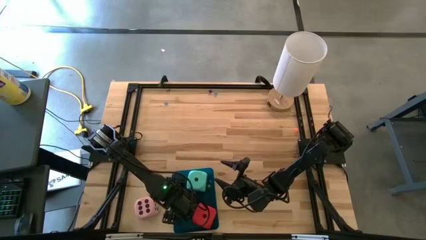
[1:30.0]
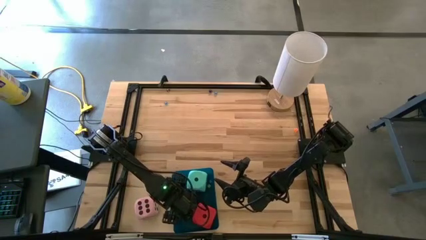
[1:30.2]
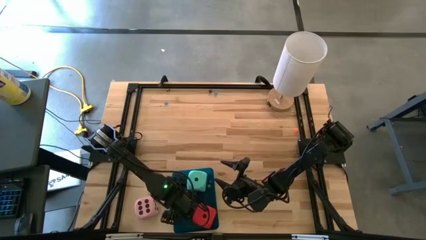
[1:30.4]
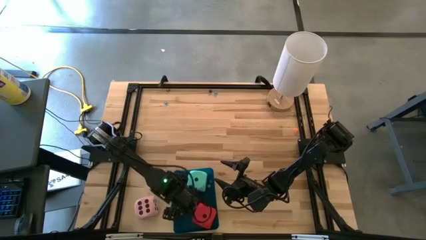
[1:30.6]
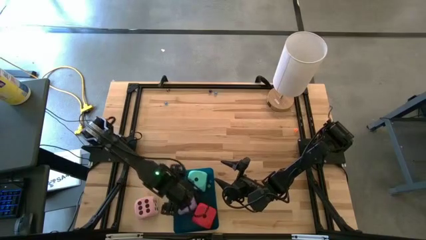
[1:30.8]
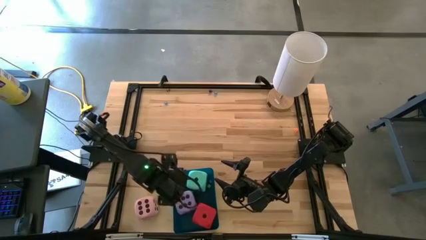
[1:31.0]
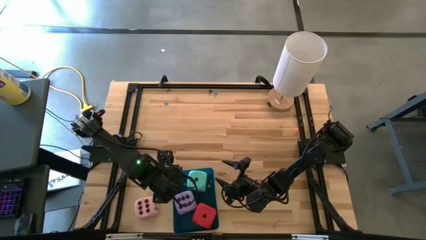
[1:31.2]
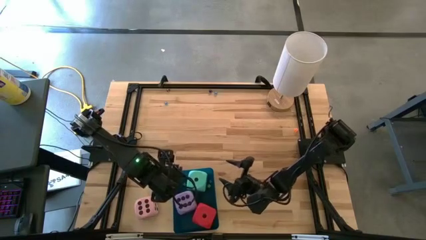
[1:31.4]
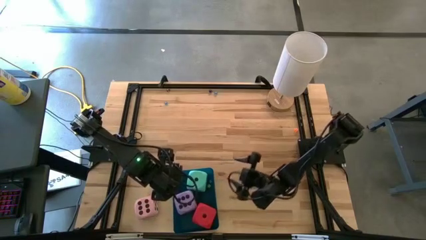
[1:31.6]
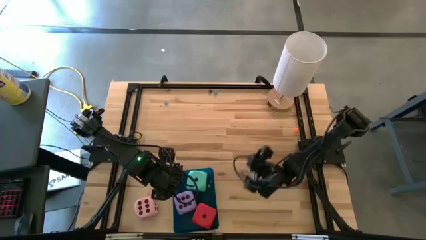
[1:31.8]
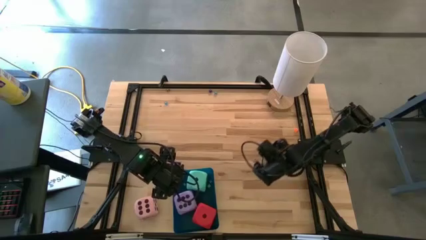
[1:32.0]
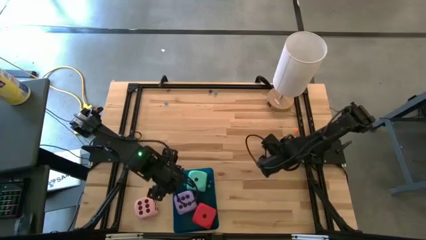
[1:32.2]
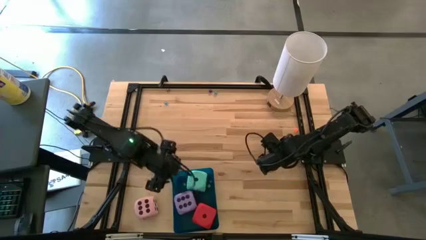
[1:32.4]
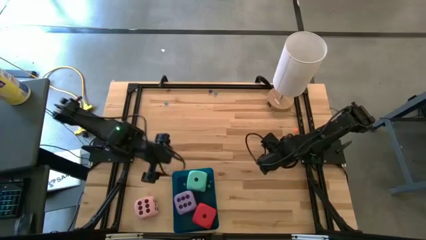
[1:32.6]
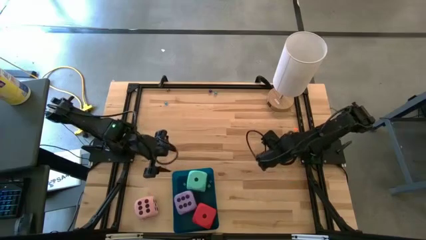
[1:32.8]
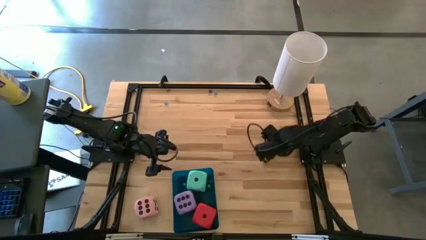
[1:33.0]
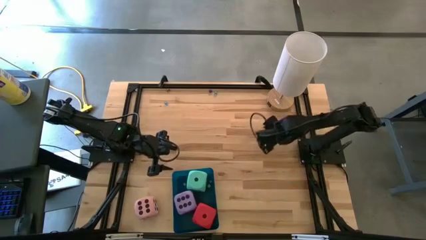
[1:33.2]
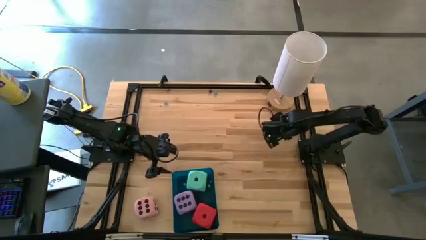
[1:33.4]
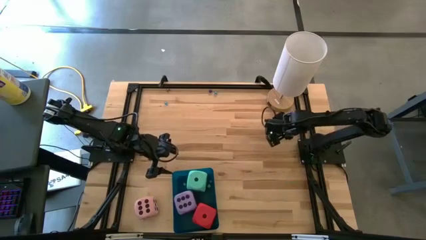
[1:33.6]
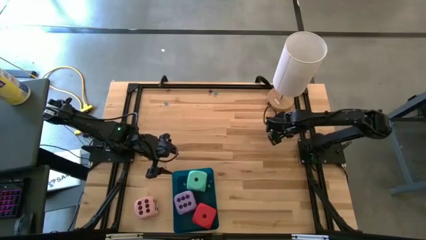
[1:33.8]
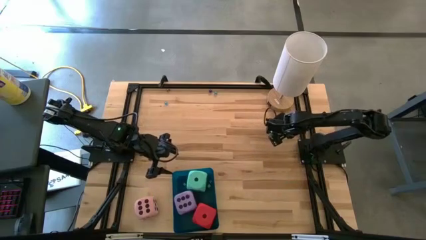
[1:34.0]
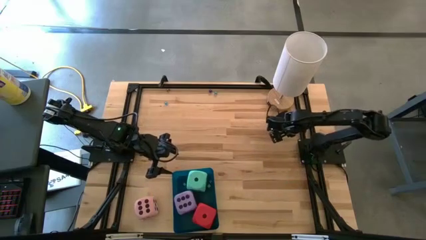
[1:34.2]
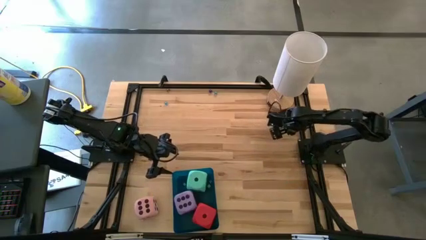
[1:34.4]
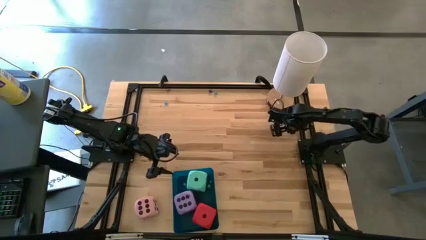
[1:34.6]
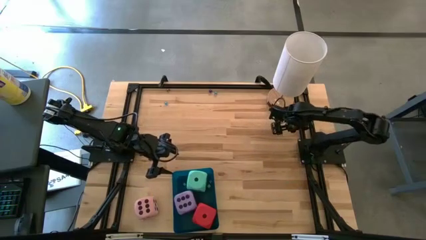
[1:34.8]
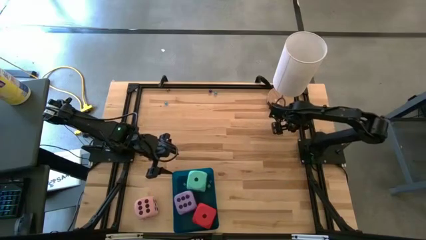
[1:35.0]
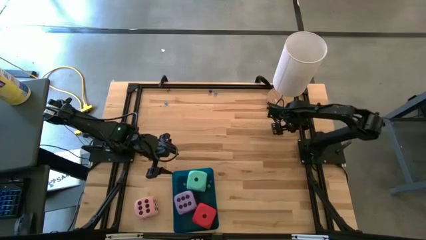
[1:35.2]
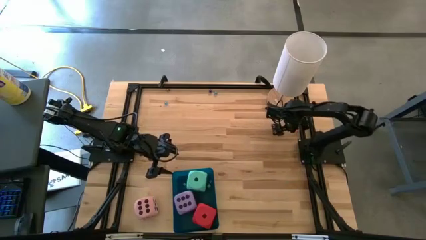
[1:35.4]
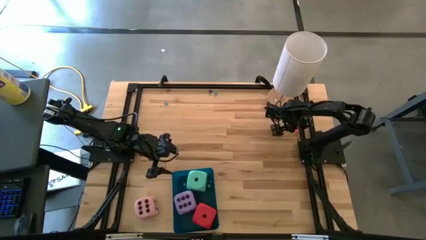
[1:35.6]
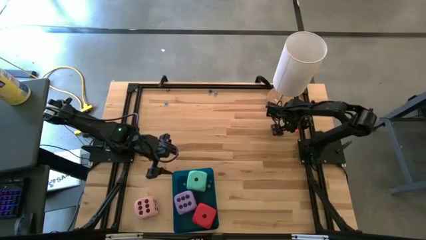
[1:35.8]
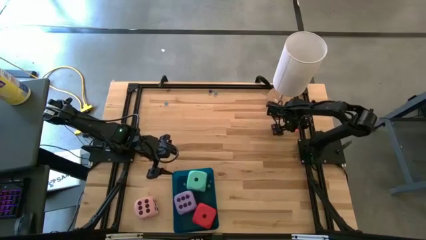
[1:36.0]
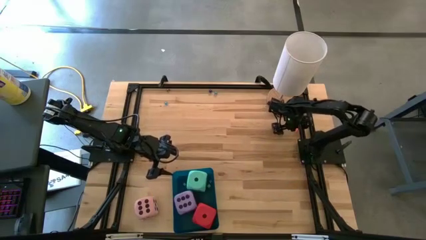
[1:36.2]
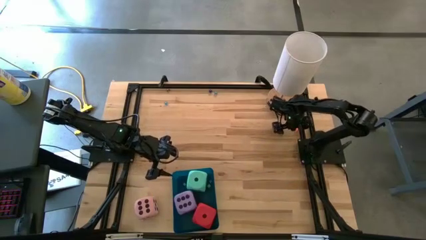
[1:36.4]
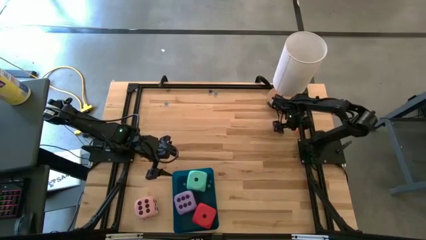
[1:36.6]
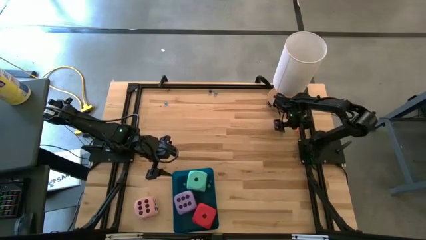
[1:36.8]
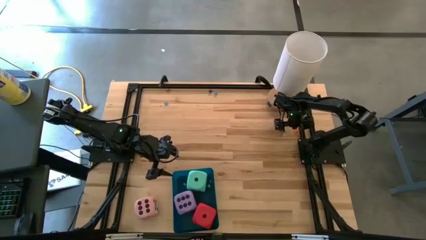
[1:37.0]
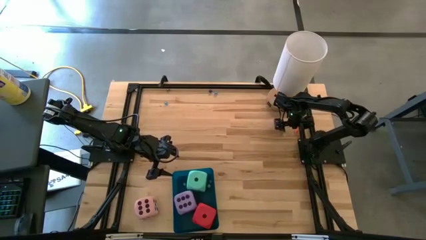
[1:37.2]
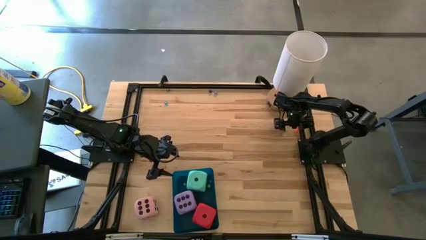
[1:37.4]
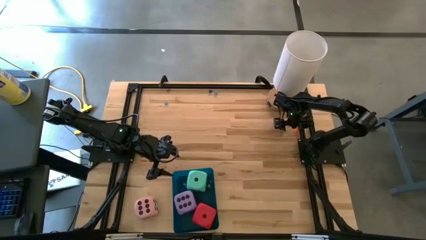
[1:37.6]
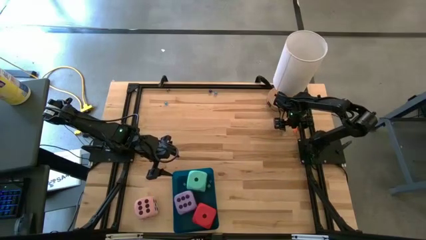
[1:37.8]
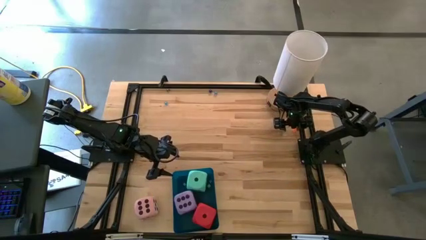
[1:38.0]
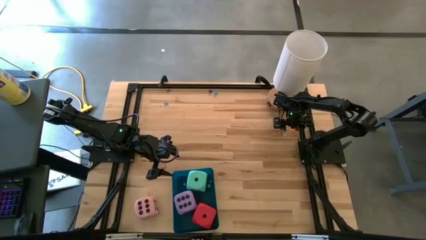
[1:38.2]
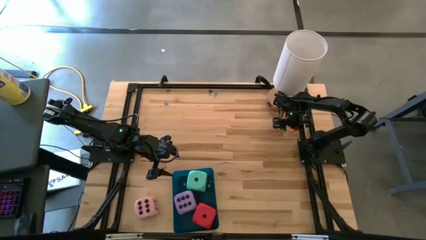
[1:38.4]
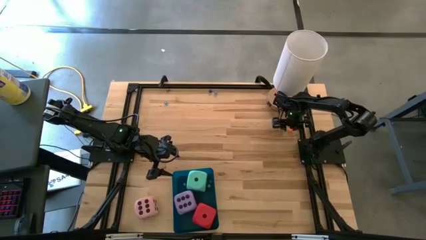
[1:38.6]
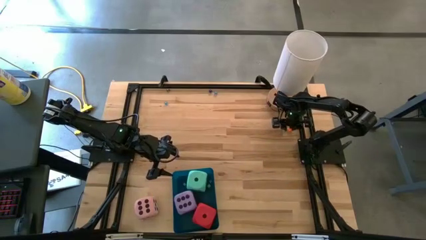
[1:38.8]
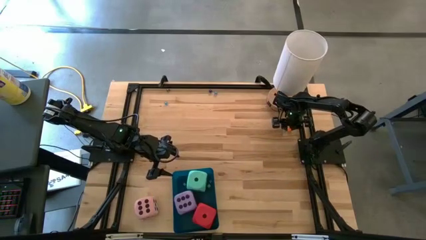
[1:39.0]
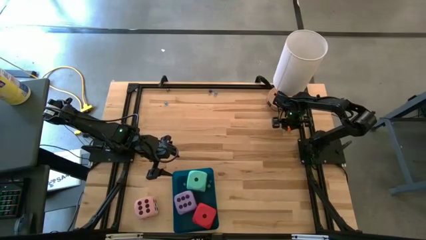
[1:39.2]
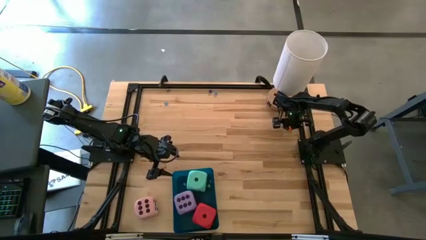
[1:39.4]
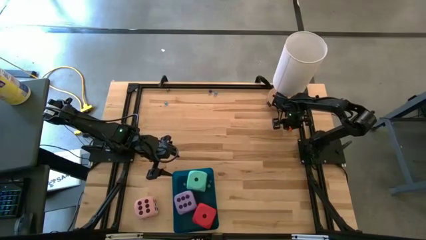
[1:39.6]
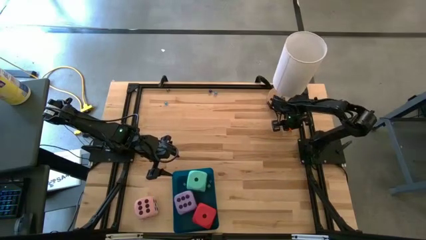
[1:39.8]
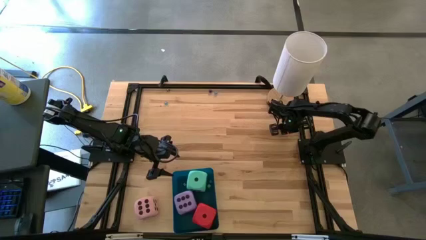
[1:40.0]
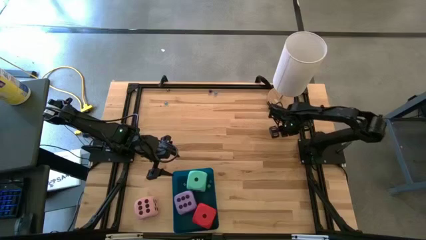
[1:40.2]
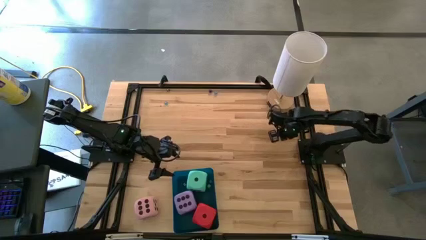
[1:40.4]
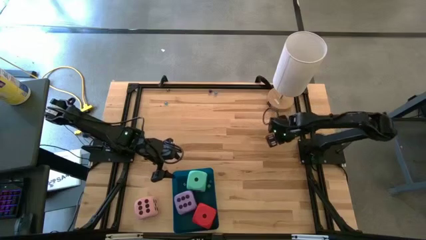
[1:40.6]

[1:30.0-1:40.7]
Task: Pick & Place Dice
Put the small orange die into the blue bin
